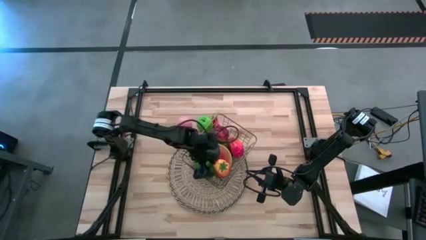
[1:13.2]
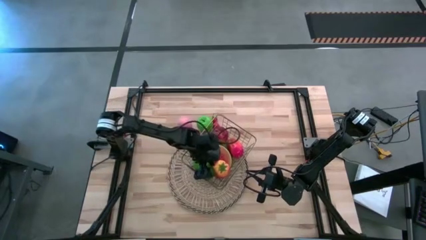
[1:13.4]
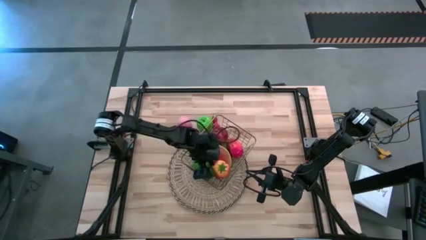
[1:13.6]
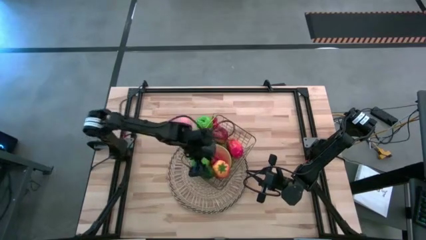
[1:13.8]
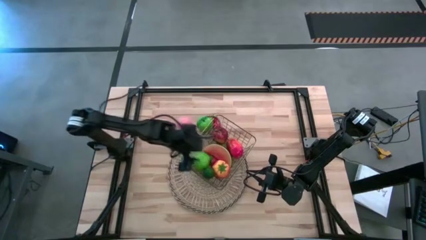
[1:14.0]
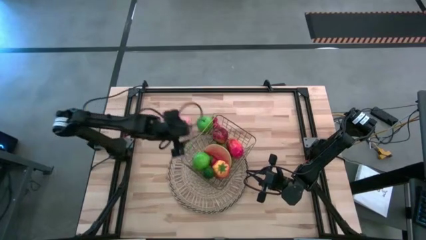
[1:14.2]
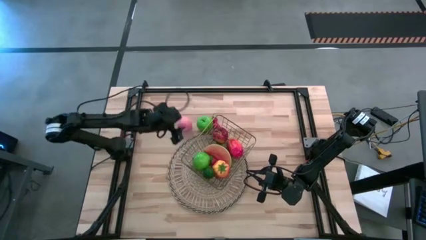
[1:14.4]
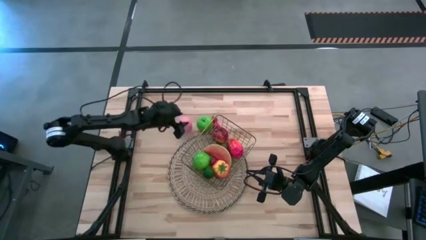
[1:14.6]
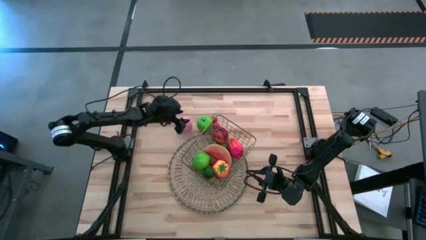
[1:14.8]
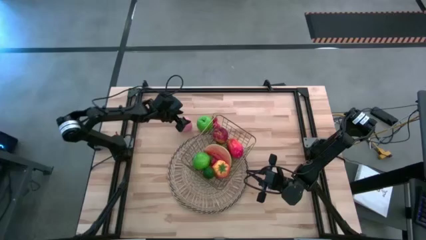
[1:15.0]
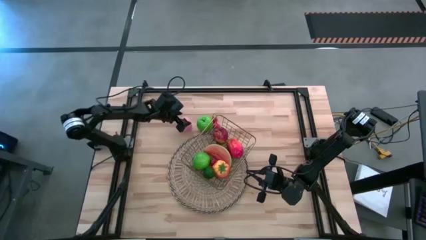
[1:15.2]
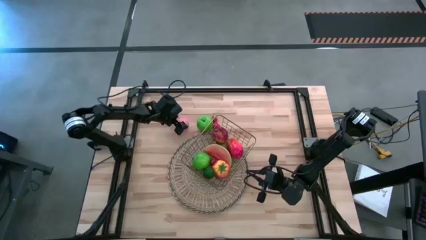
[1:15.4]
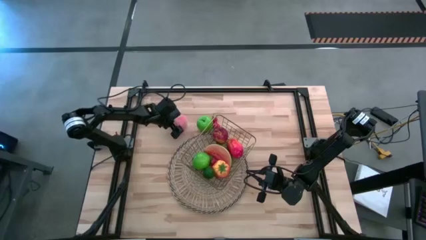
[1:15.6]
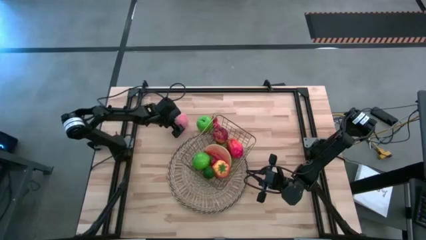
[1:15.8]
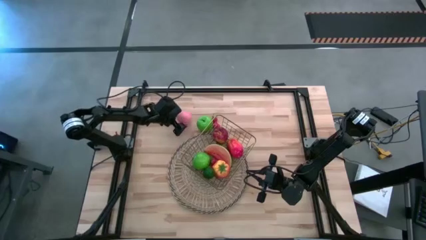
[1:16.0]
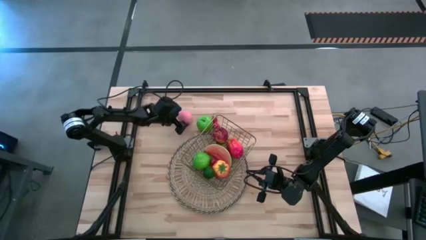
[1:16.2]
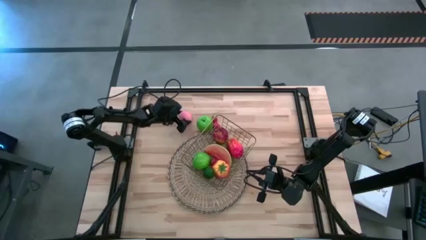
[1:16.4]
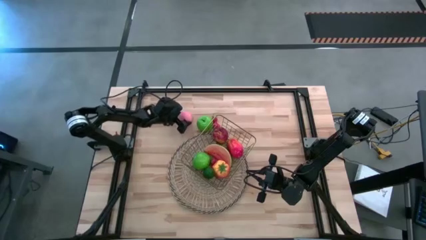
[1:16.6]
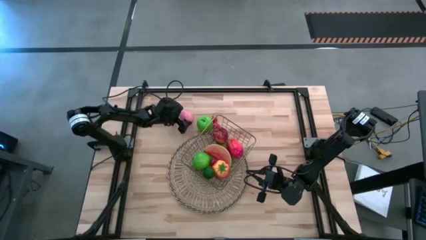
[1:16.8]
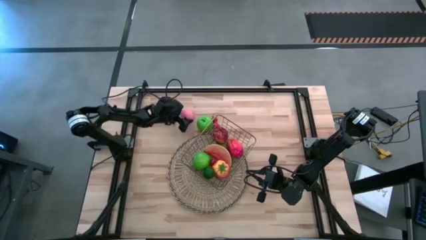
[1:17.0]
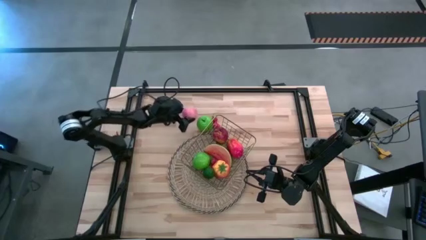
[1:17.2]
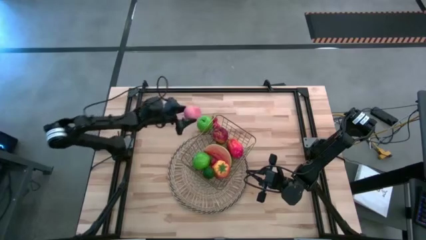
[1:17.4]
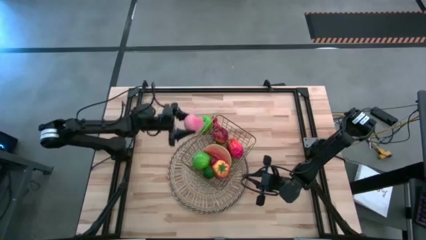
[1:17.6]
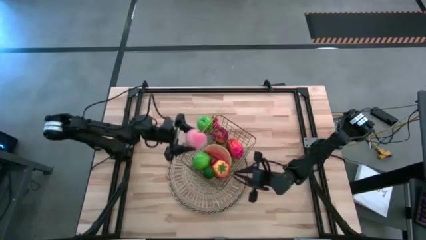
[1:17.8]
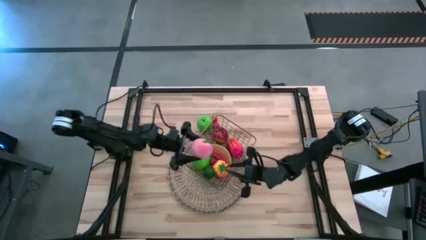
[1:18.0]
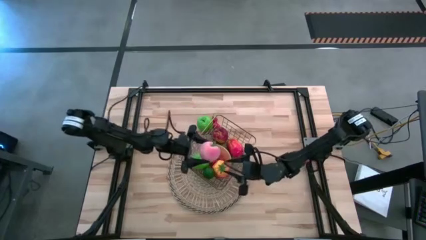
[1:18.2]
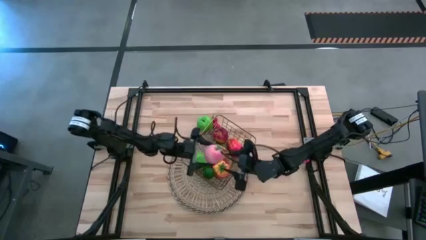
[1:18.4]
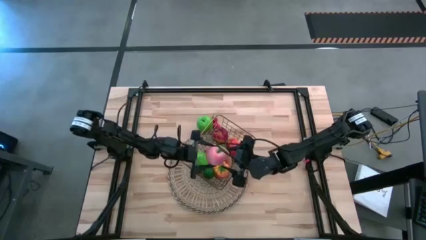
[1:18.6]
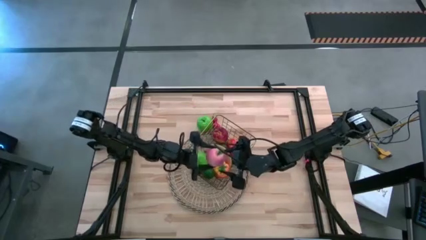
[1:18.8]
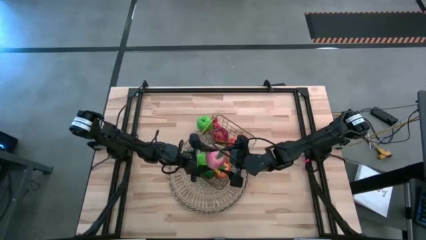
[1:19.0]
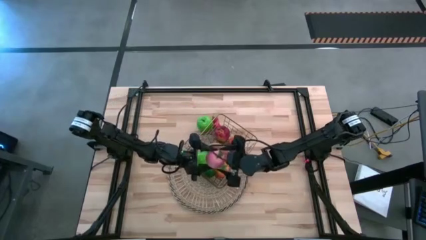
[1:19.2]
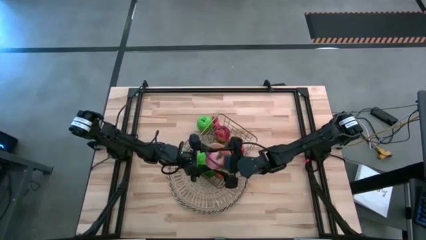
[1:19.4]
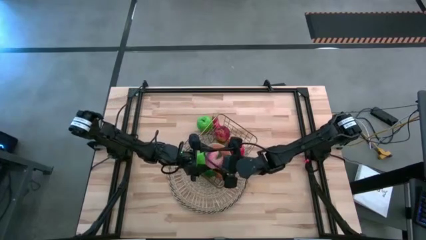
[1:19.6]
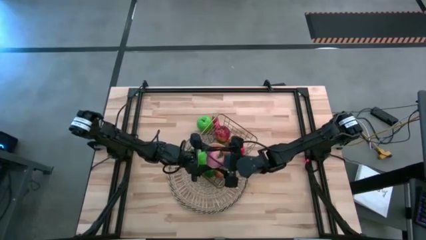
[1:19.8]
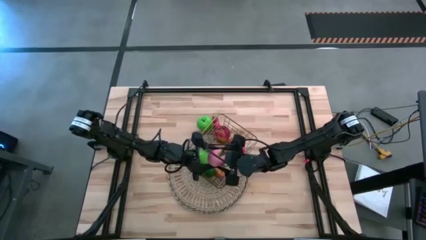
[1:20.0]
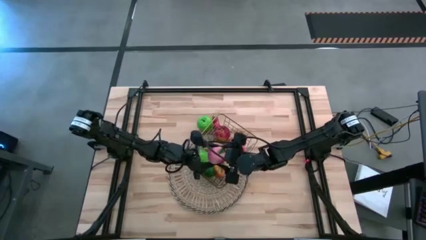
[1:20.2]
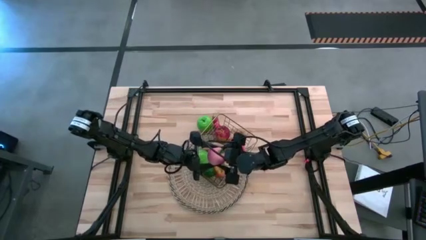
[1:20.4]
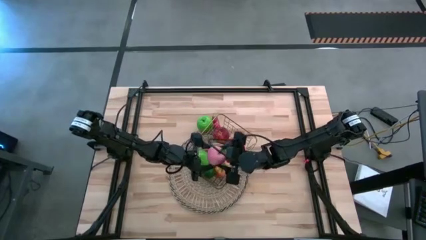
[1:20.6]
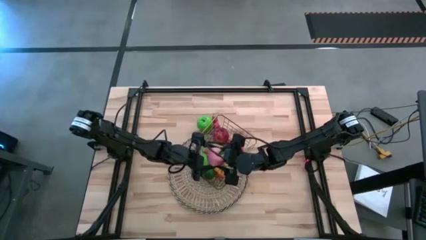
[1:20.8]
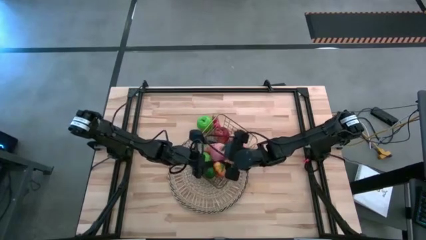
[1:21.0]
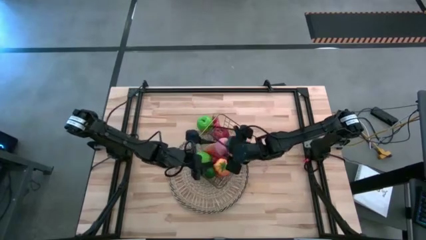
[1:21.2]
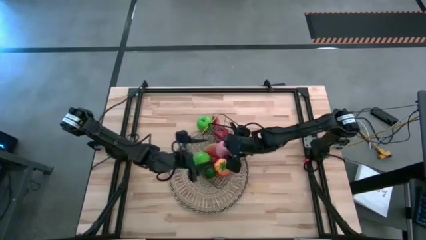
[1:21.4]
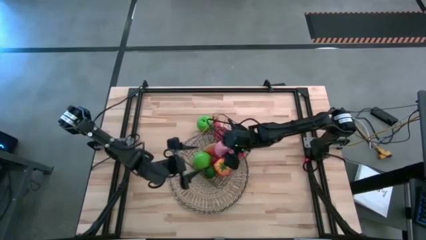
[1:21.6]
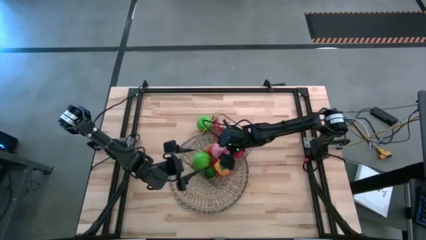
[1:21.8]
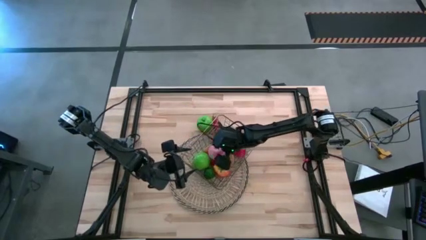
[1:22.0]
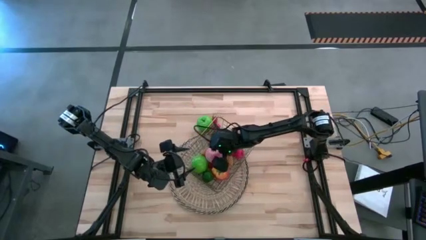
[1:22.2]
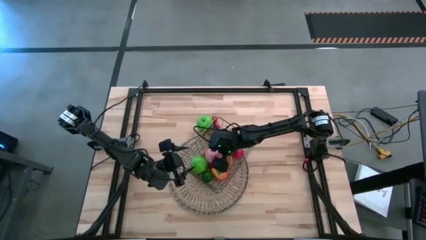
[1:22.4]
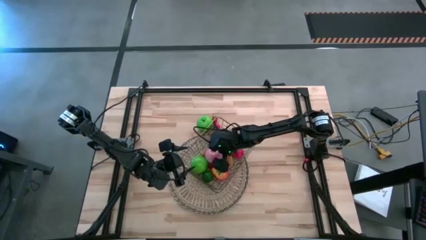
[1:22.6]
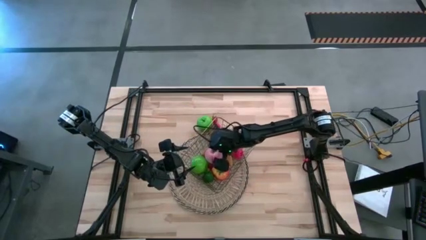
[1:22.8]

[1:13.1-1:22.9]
Task: Build produce basket
Put the peach into the gold wire basket

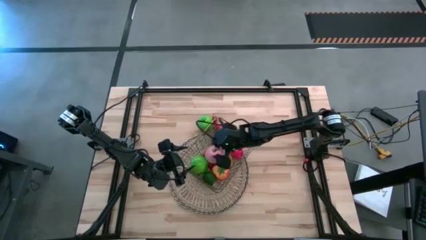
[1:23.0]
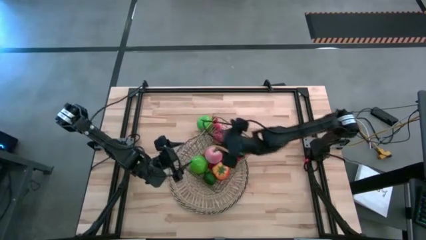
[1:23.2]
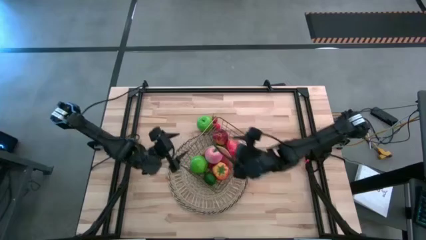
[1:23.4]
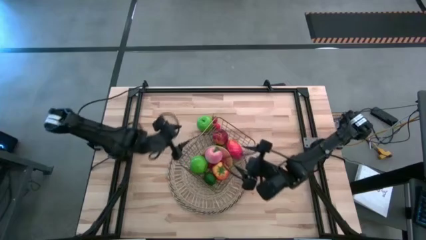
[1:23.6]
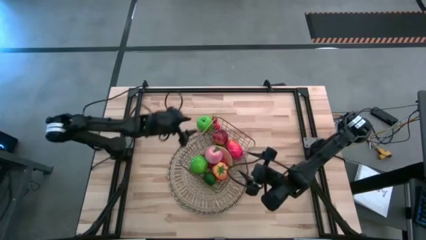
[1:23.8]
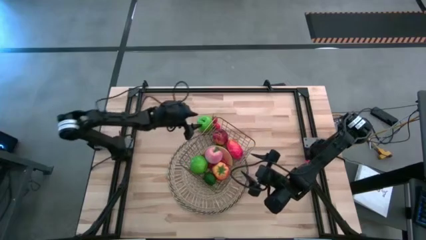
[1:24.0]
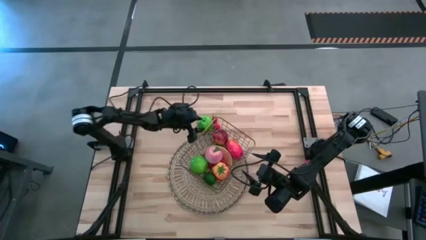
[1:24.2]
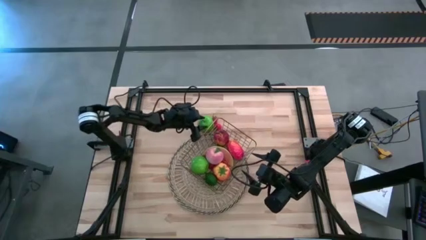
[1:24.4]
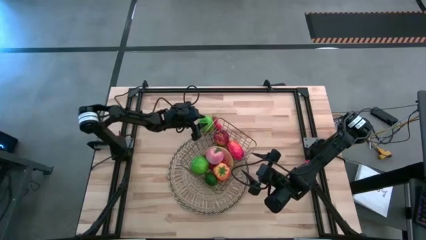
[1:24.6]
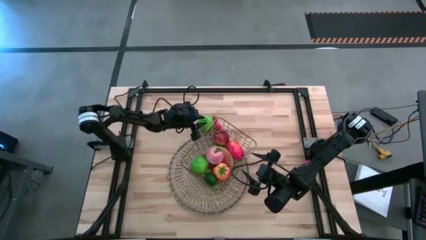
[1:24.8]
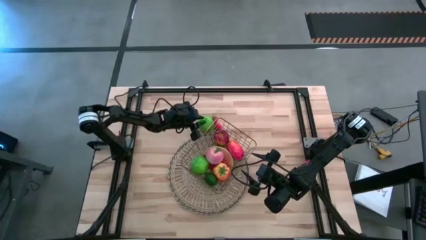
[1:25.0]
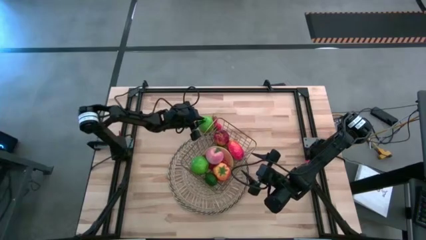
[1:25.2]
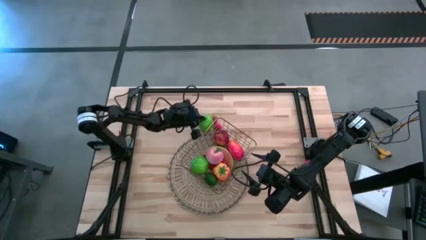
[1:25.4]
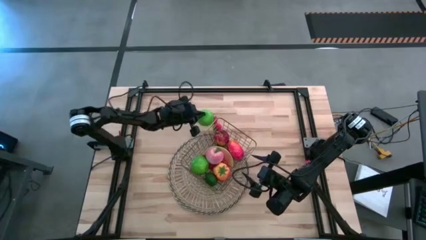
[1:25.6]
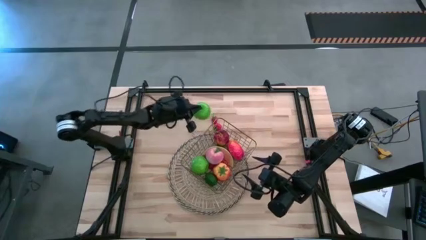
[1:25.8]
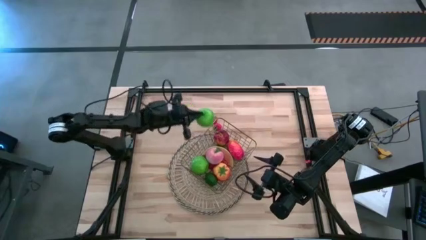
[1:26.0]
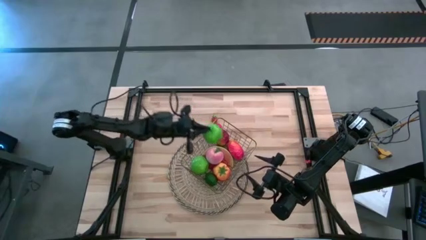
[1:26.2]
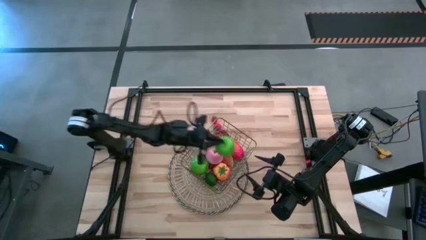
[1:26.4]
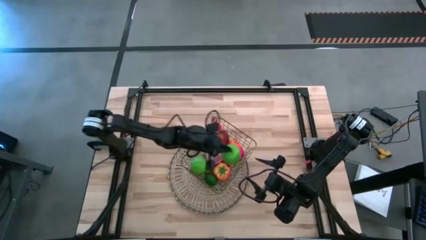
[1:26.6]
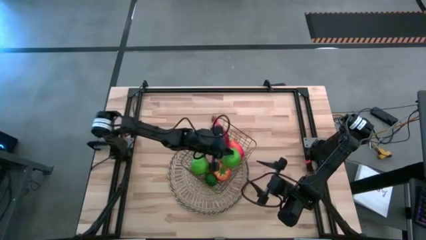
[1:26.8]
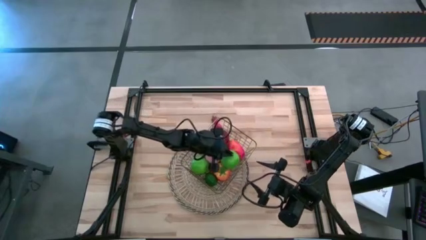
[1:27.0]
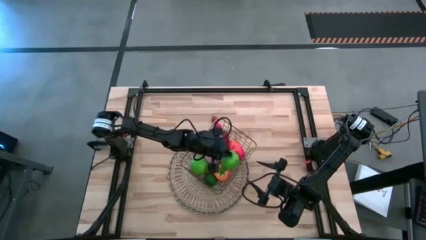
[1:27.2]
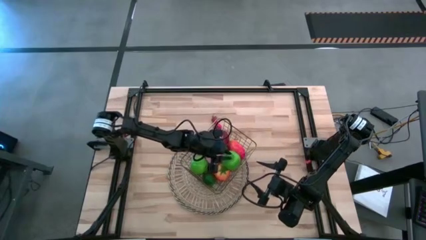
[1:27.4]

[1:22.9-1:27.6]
Put the green apple into the gold wire basket

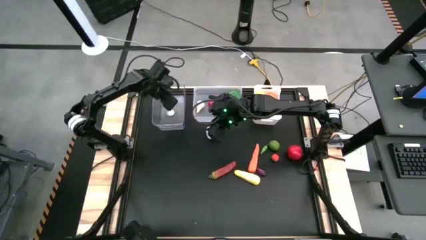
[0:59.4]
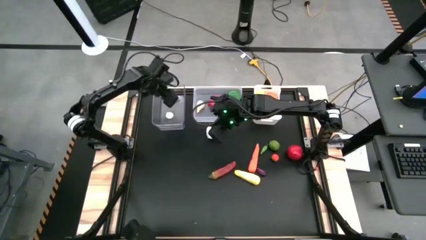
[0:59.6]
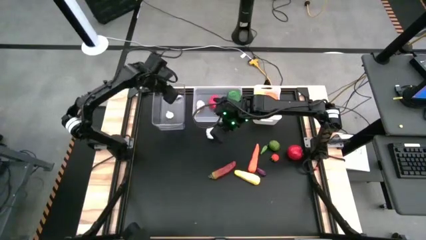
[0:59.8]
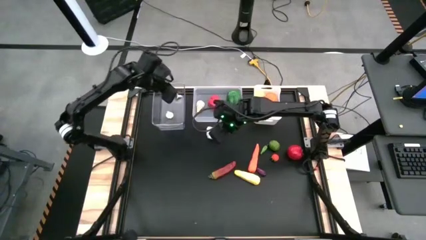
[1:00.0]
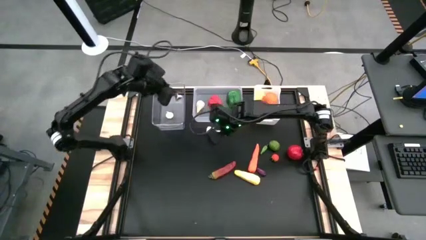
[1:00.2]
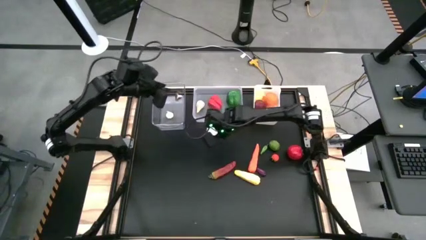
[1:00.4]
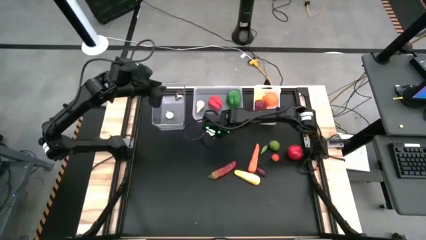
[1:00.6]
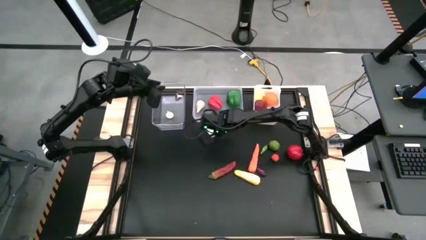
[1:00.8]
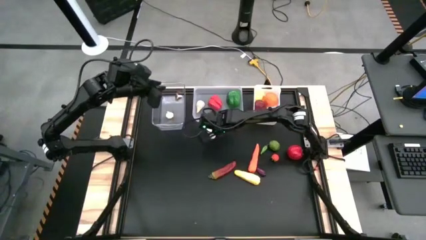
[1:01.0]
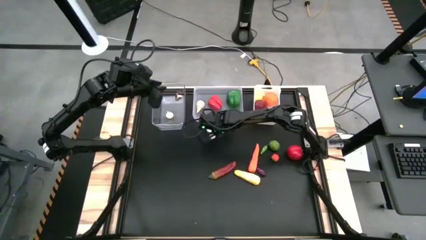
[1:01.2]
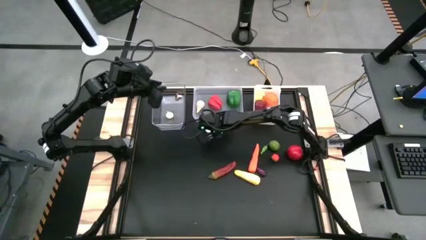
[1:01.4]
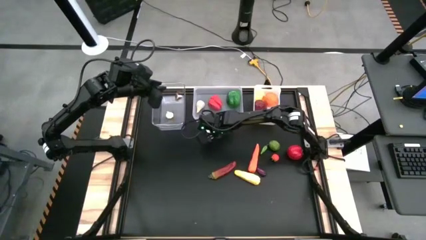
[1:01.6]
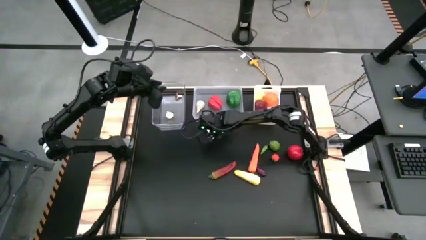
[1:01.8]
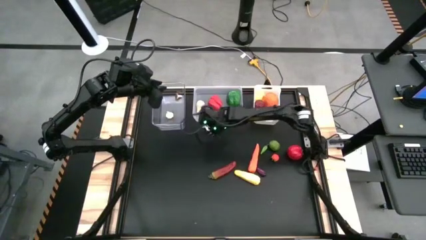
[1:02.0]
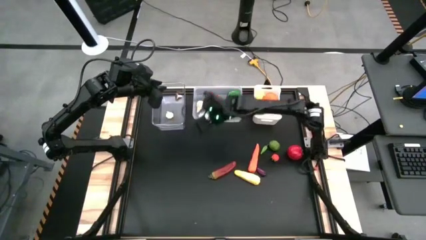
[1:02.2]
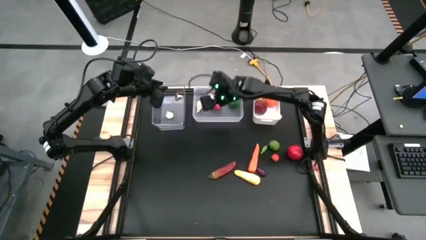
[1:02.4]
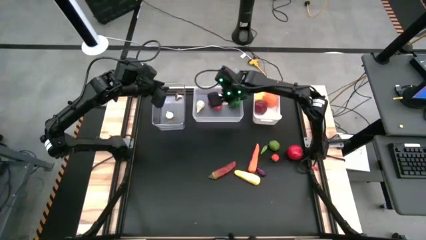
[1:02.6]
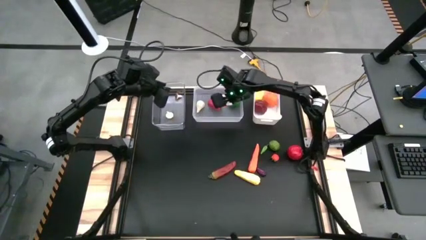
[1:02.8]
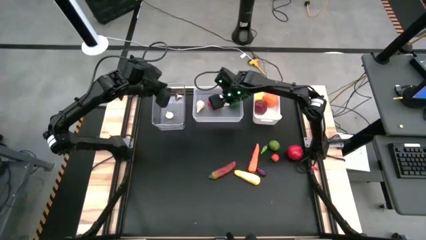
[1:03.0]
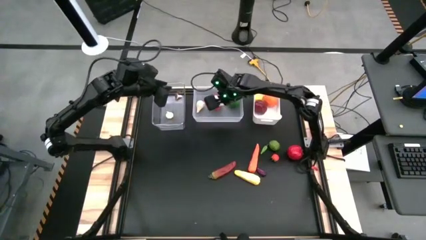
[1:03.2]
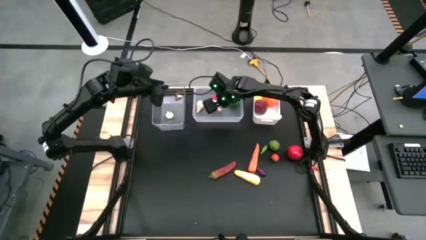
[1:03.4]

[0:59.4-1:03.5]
Task: Sort produce into baskets
Put the white garlic into the transparent bin
